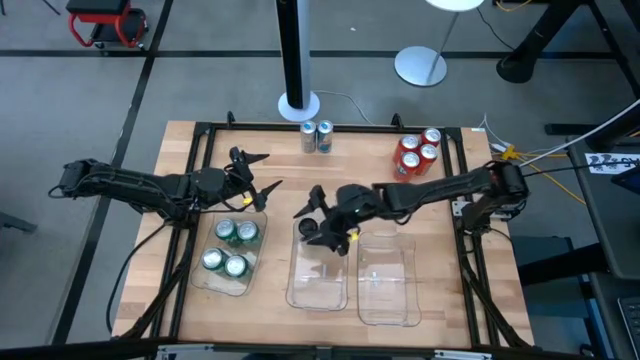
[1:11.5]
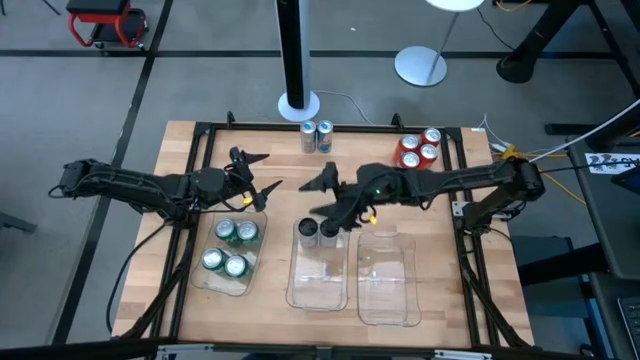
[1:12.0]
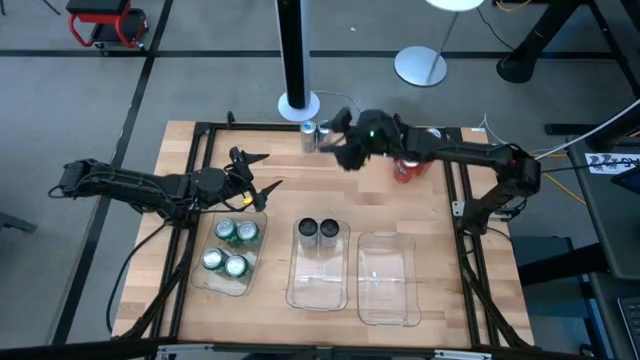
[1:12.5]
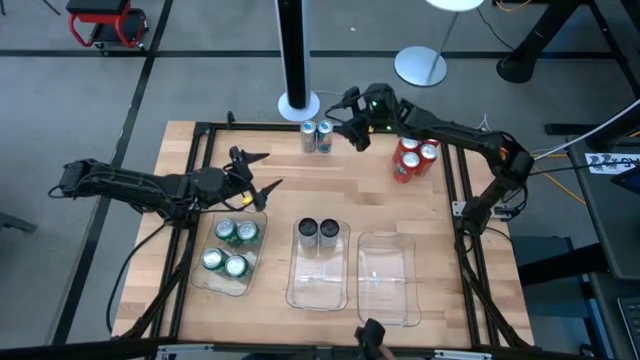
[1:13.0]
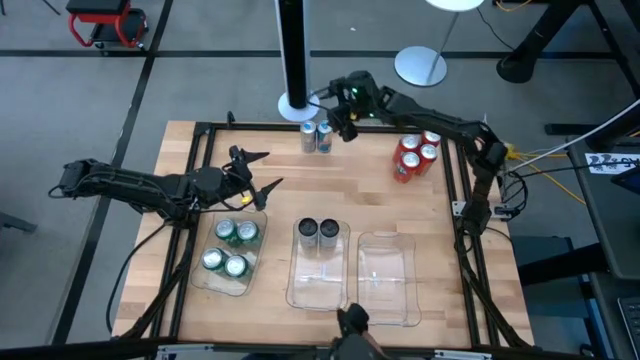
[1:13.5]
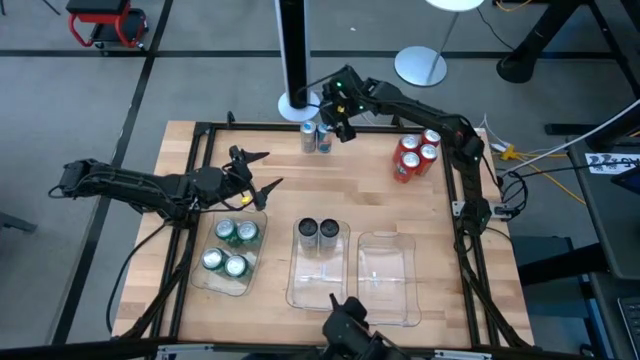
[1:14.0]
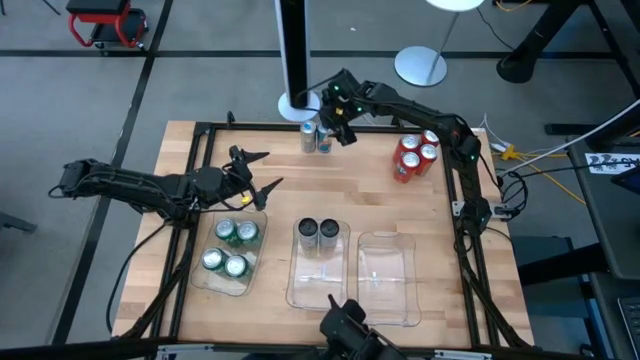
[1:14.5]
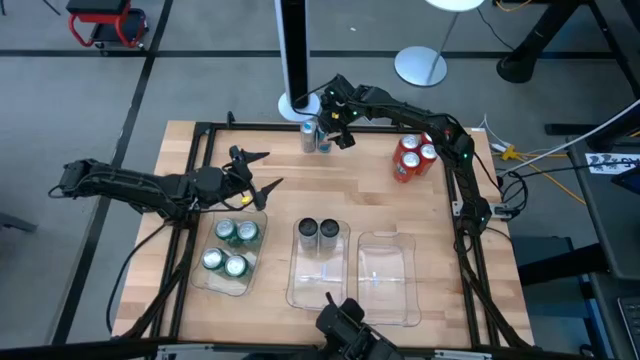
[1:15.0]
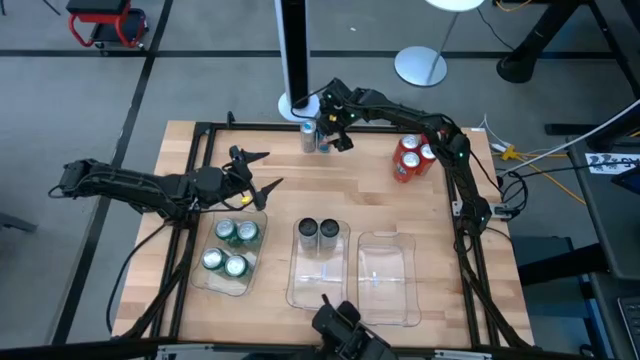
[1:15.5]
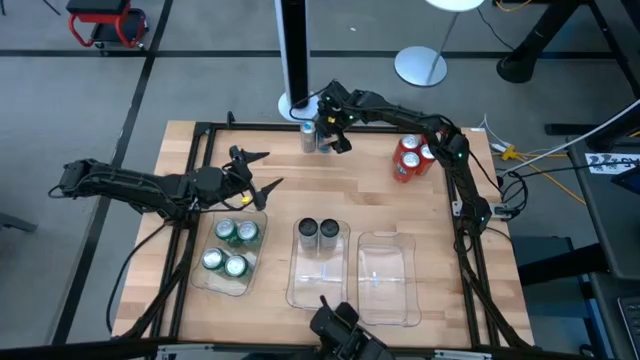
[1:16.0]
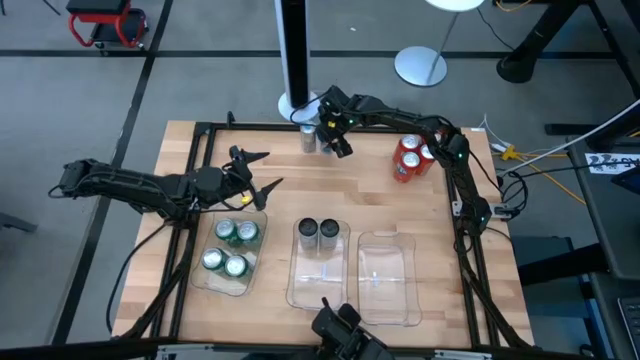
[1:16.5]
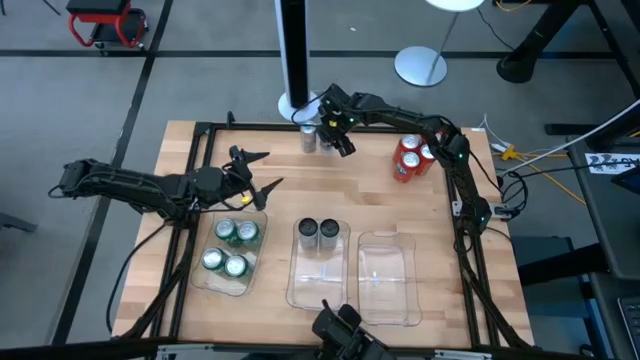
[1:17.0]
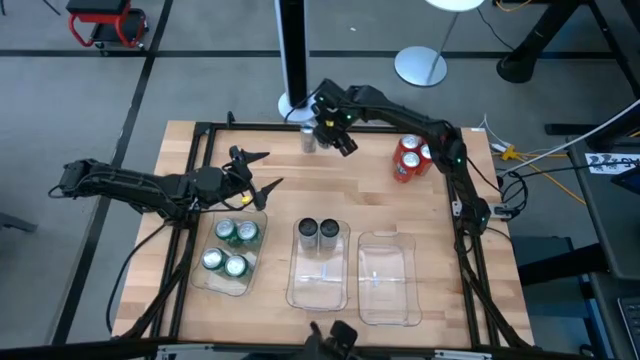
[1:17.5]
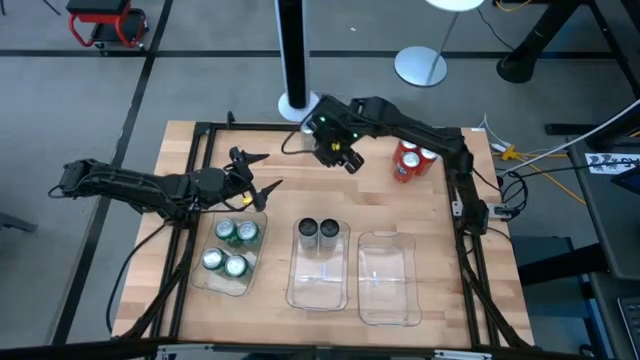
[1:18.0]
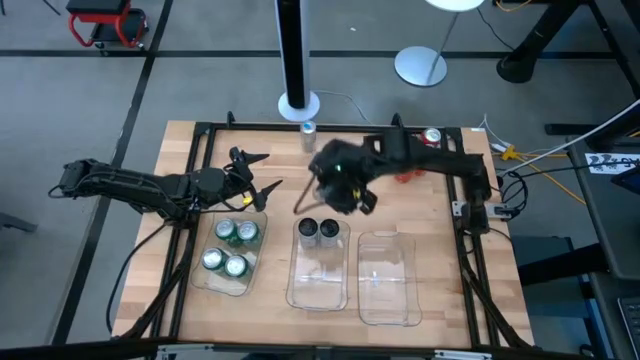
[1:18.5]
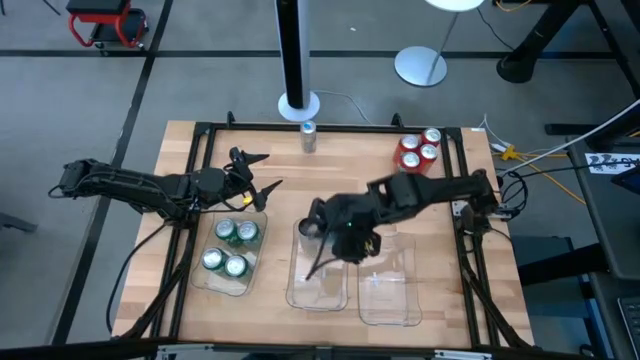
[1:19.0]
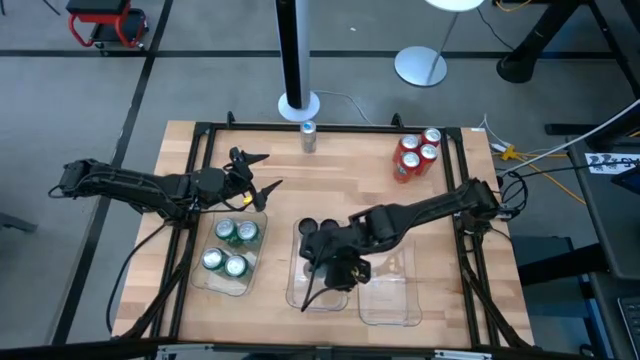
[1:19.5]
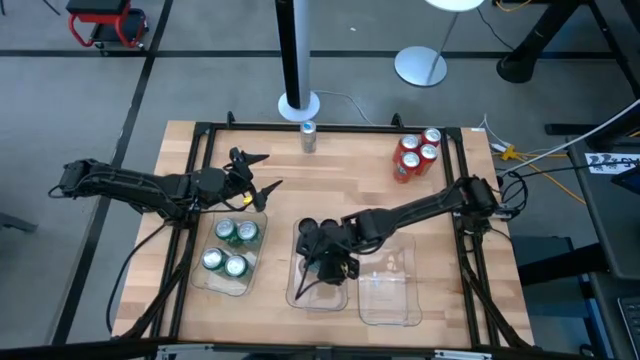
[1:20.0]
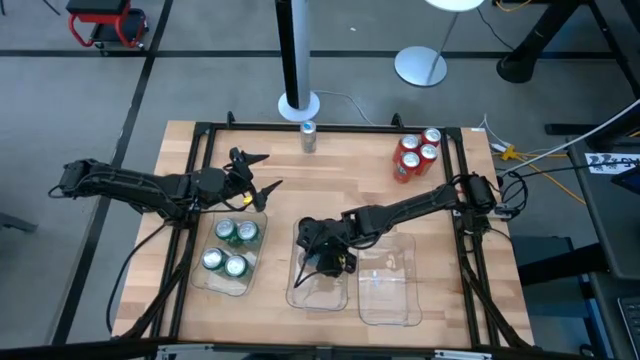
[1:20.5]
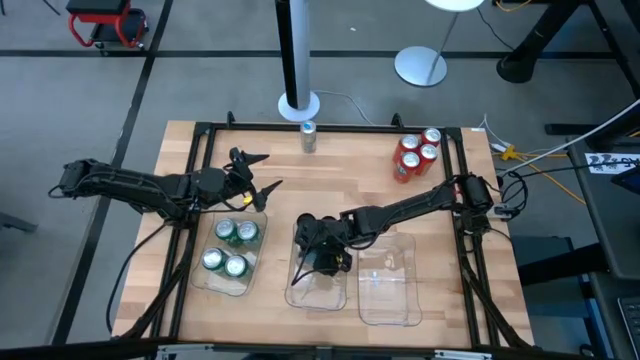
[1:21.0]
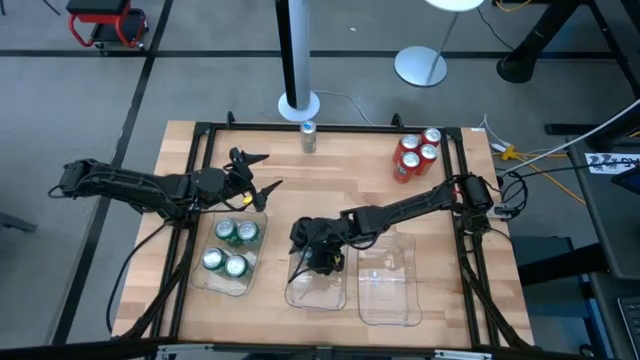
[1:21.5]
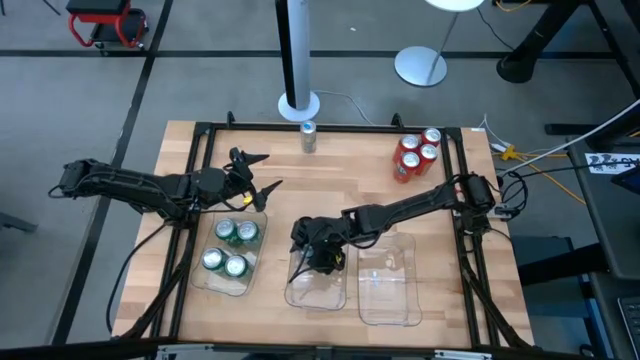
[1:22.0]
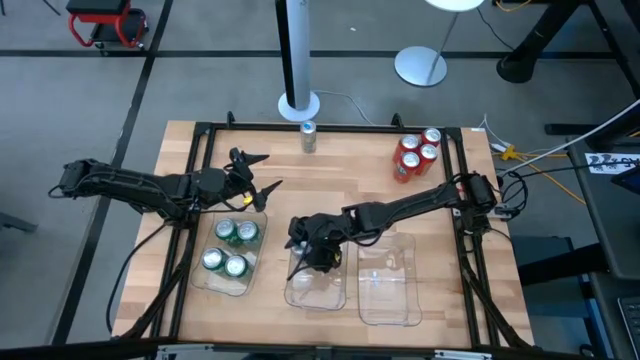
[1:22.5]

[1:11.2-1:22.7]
Task: Sort soda cans
Put the right blue soda can into the middle transparent bin

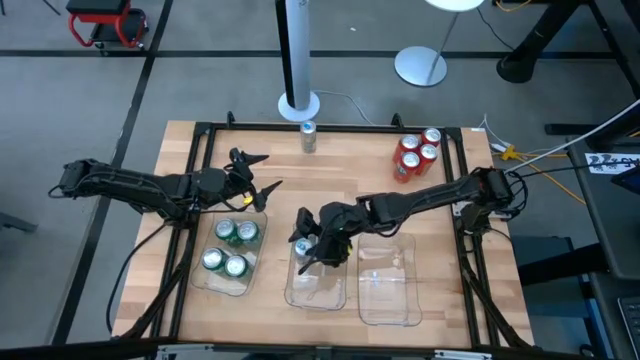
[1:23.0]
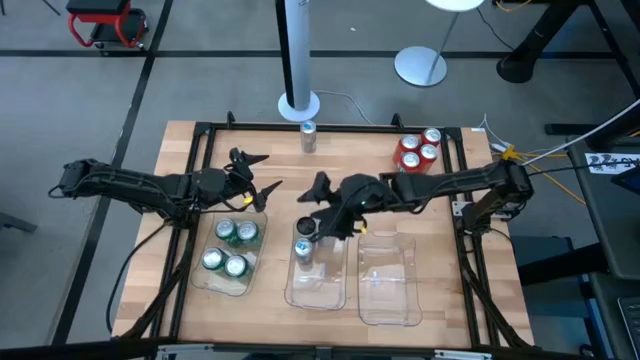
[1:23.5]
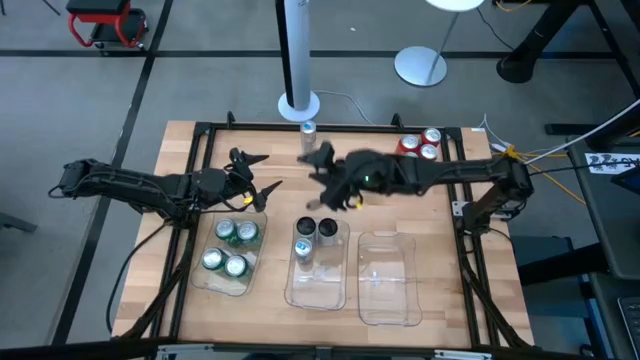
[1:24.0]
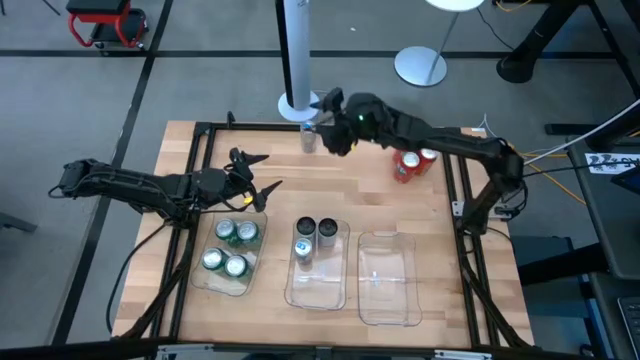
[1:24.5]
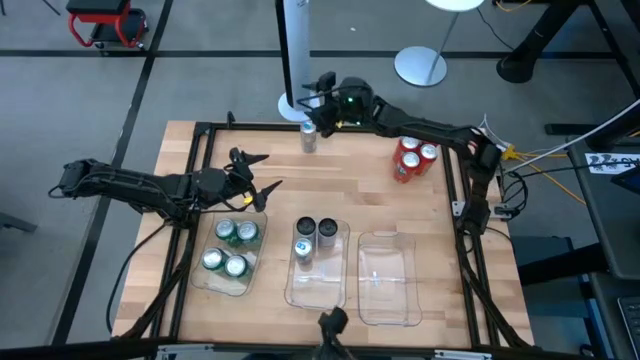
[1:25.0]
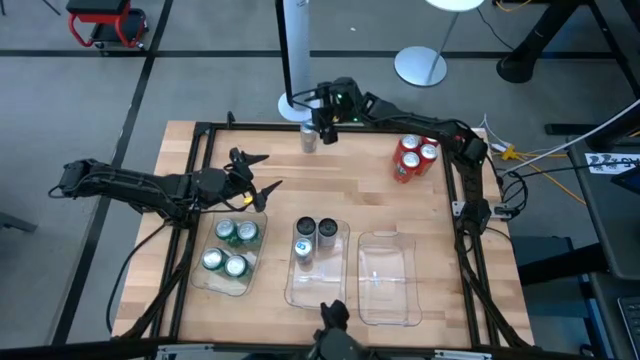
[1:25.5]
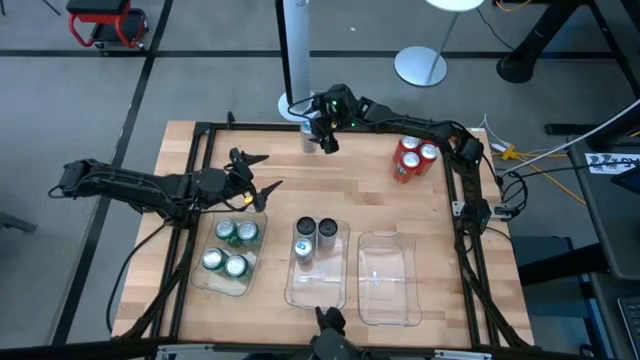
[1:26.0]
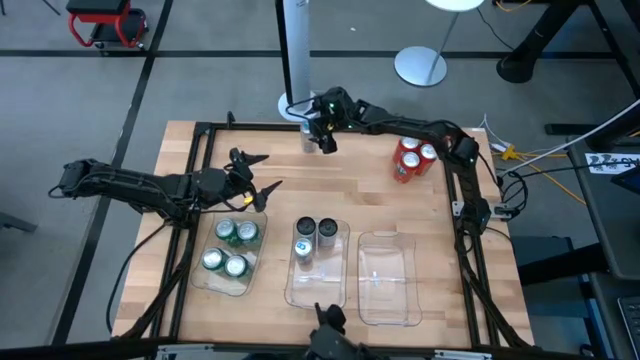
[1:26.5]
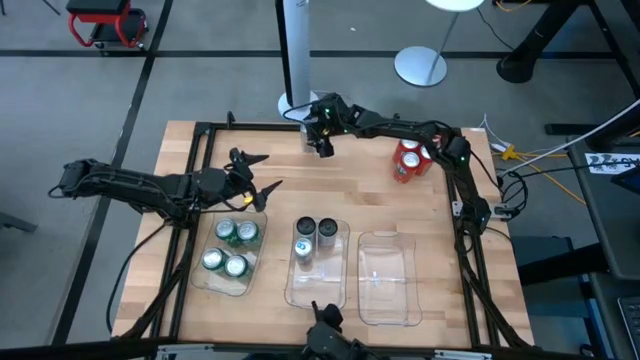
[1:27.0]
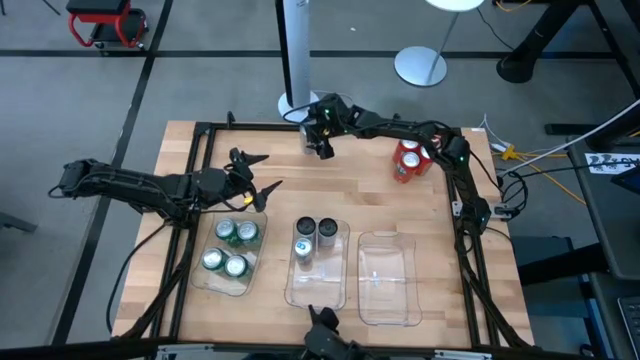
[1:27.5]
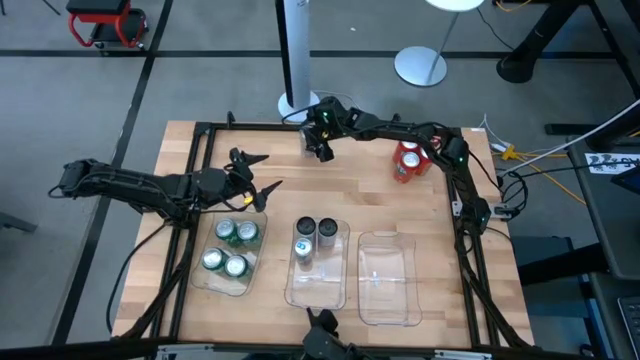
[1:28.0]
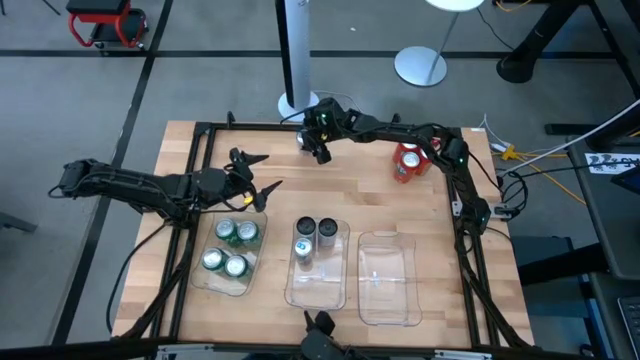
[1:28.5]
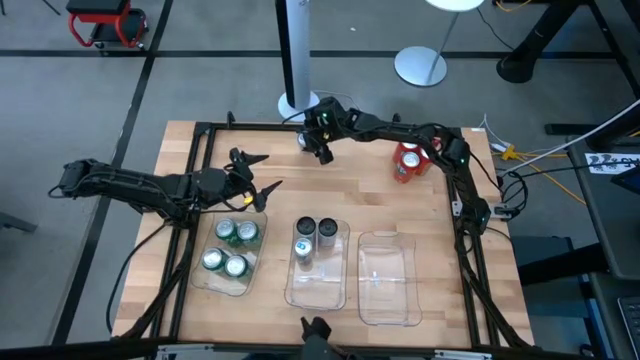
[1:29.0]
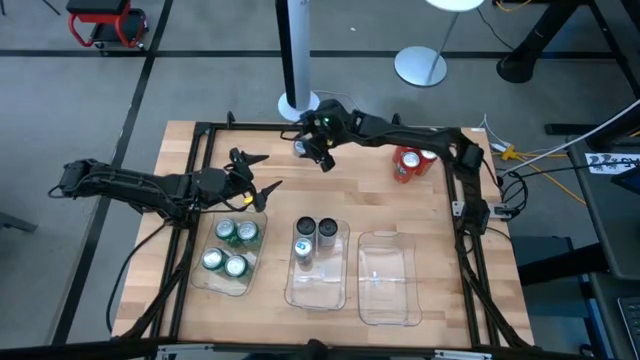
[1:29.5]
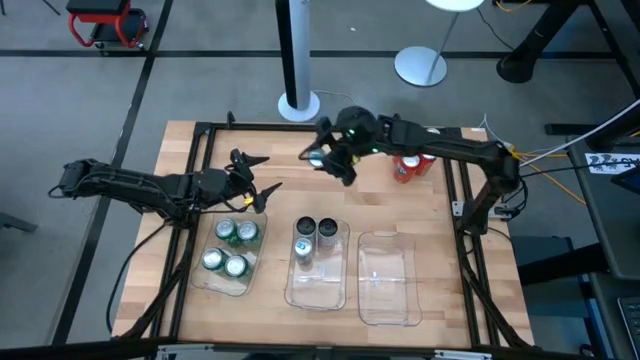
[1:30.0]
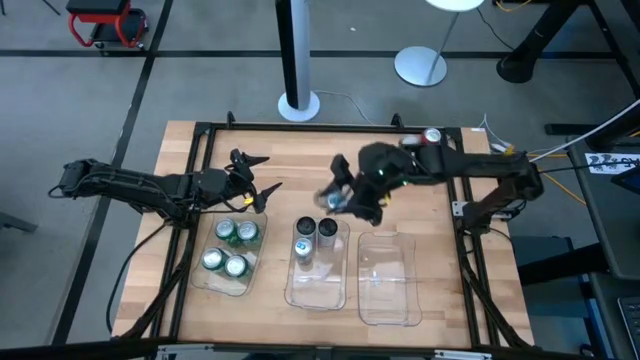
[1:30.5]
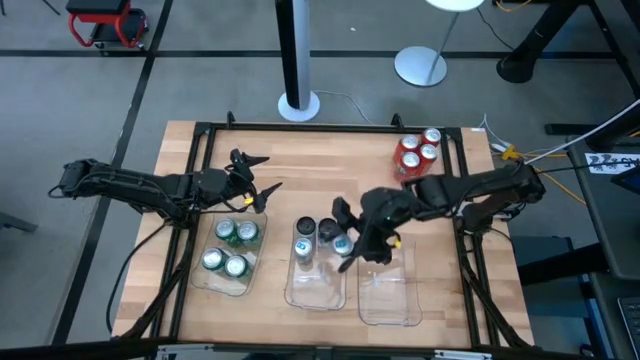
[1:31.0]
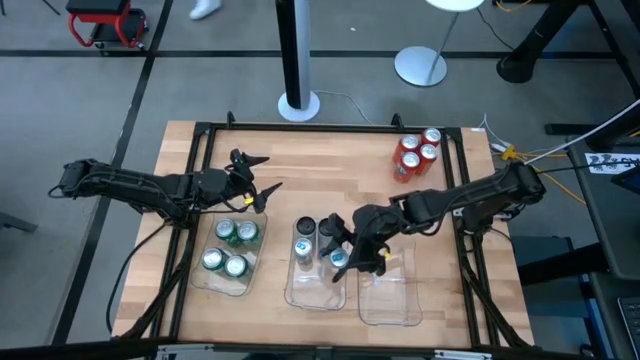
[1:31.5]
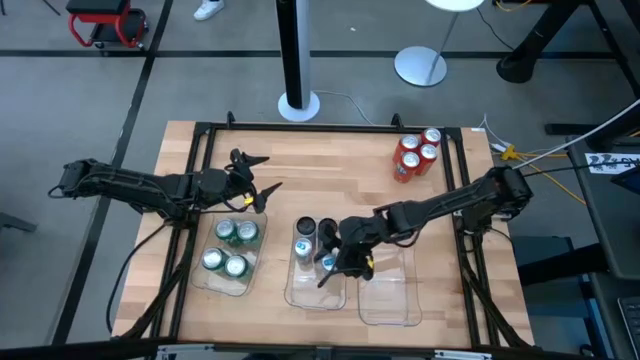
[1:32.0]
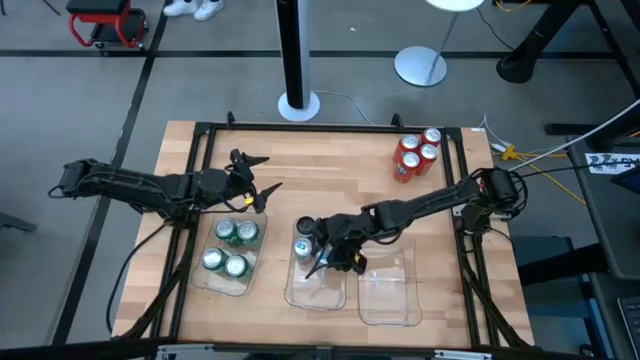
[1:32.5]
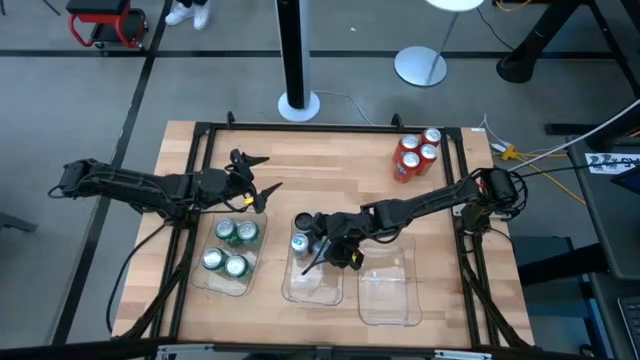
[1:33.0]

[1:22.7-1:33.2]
Put the blue soda can into the middle transparent bin
